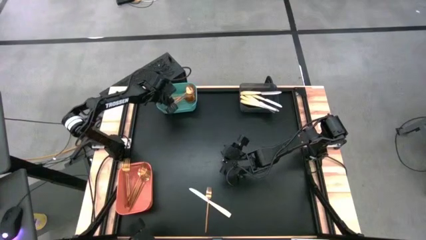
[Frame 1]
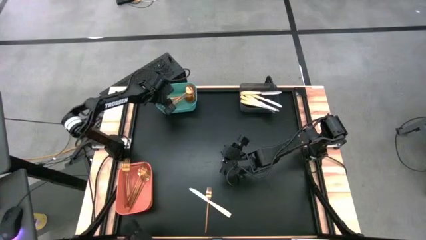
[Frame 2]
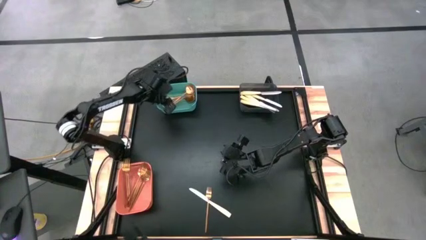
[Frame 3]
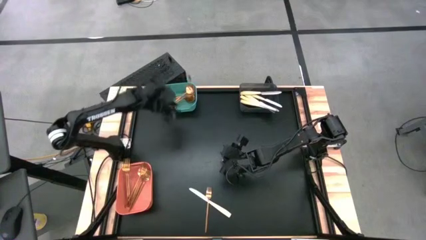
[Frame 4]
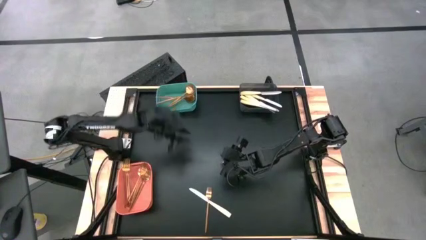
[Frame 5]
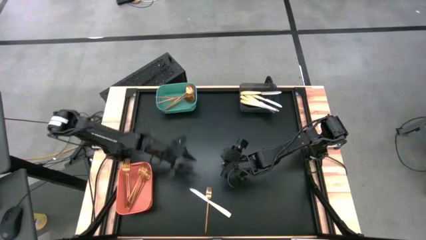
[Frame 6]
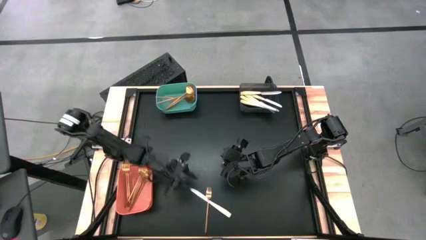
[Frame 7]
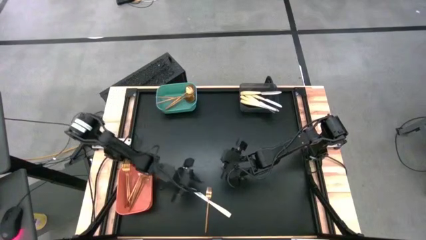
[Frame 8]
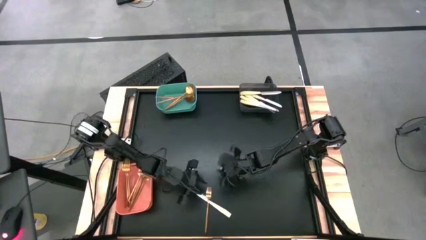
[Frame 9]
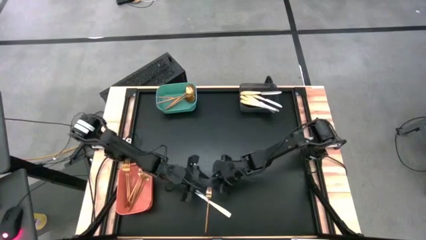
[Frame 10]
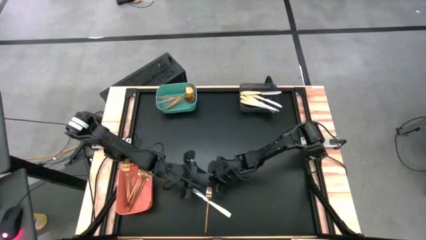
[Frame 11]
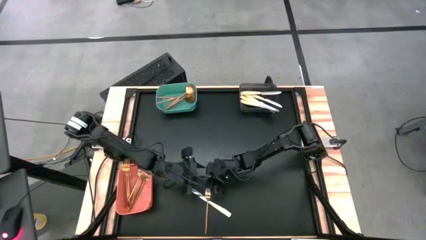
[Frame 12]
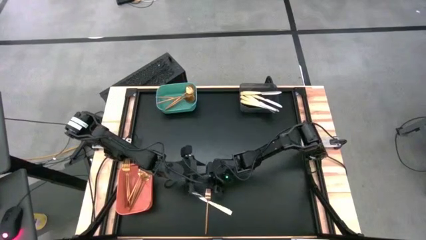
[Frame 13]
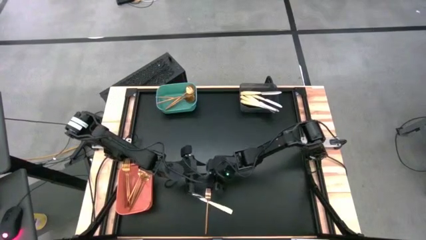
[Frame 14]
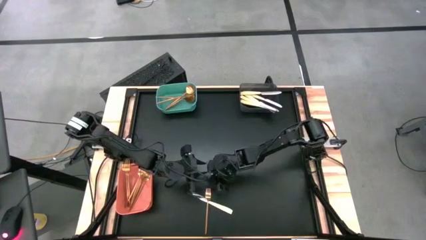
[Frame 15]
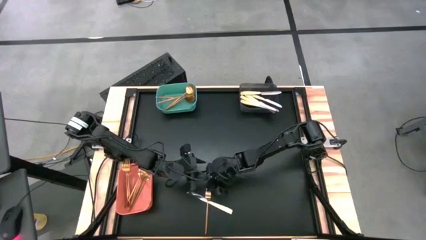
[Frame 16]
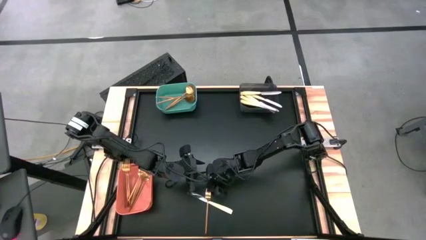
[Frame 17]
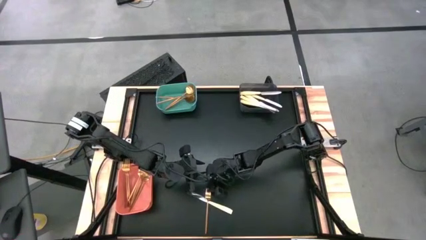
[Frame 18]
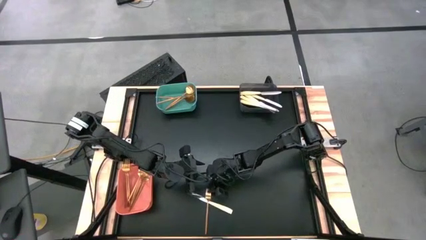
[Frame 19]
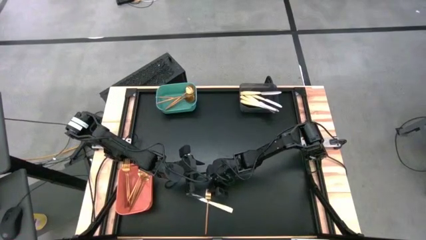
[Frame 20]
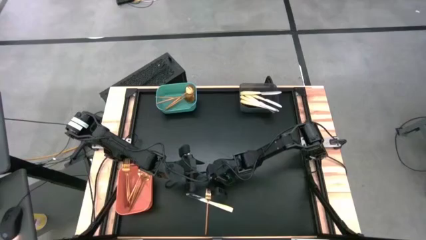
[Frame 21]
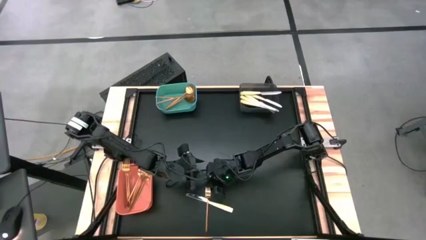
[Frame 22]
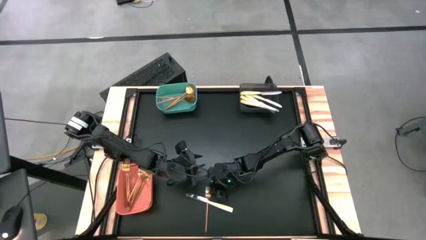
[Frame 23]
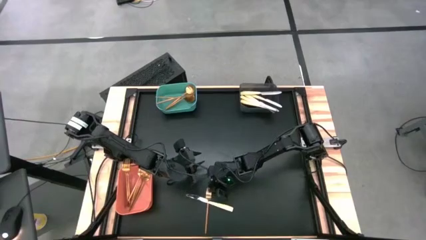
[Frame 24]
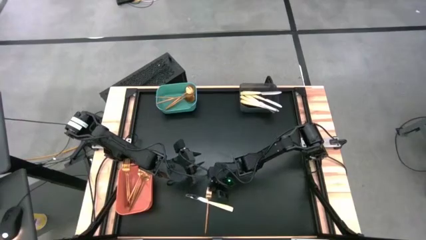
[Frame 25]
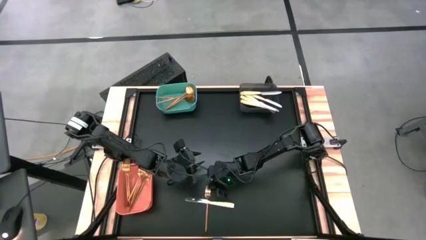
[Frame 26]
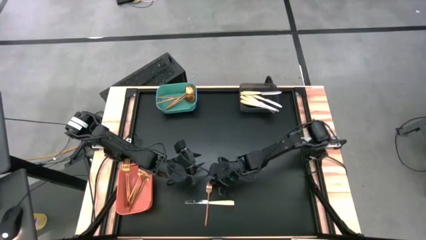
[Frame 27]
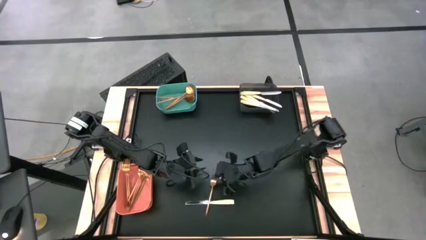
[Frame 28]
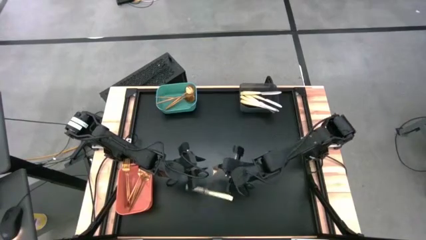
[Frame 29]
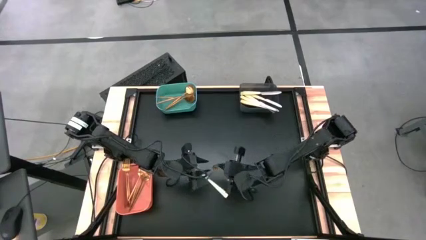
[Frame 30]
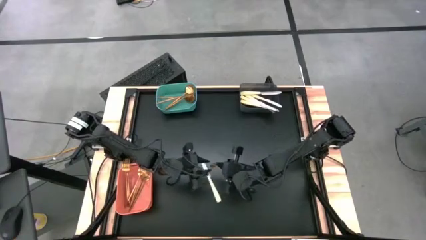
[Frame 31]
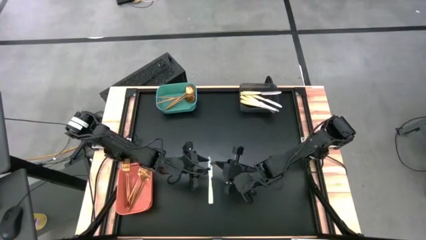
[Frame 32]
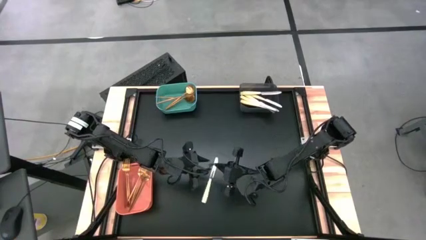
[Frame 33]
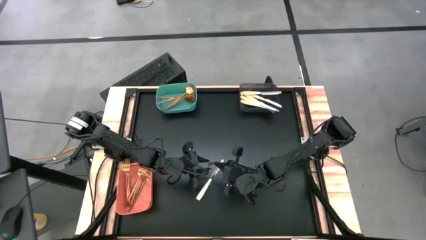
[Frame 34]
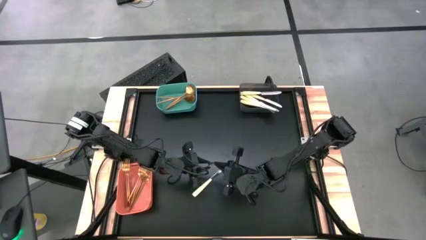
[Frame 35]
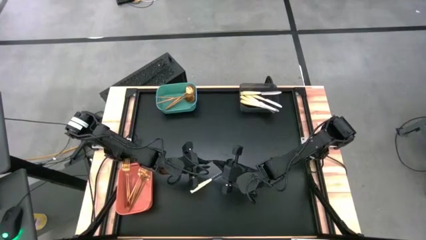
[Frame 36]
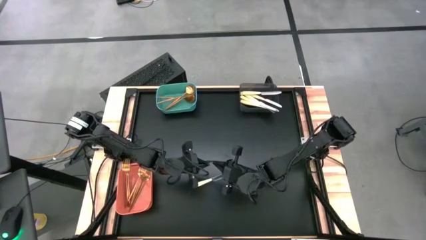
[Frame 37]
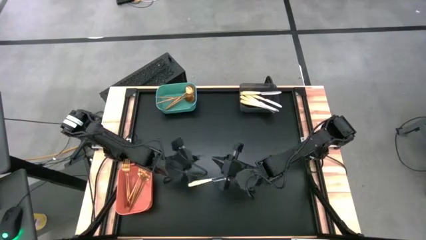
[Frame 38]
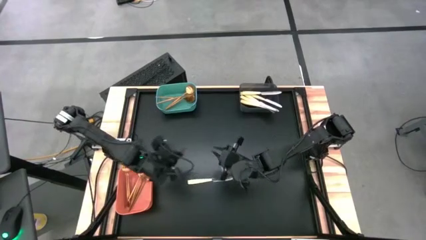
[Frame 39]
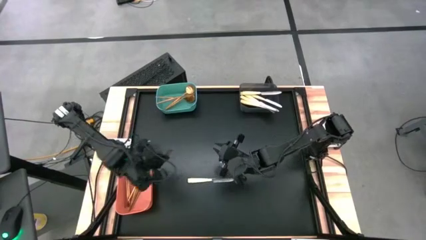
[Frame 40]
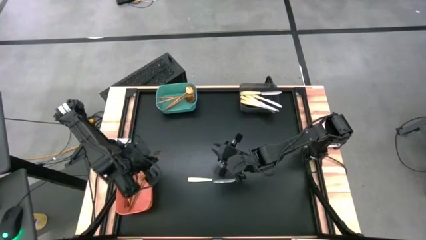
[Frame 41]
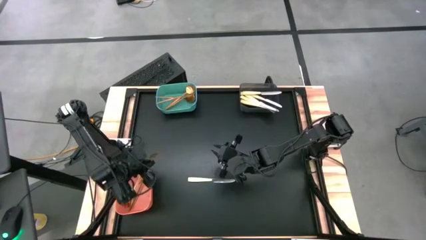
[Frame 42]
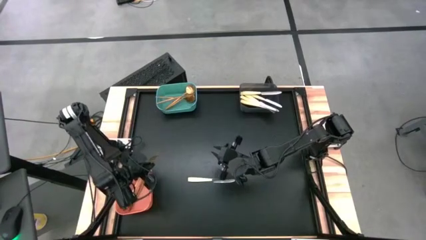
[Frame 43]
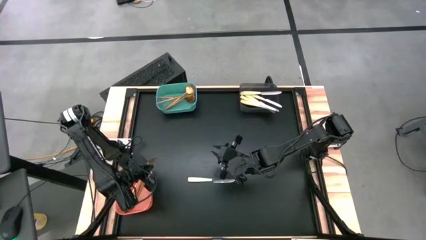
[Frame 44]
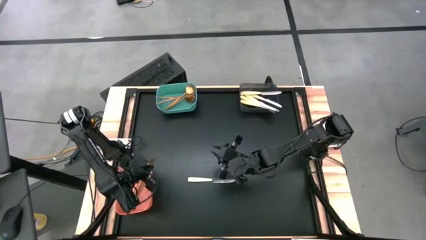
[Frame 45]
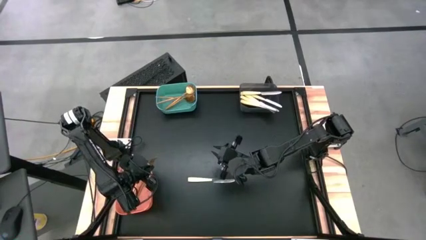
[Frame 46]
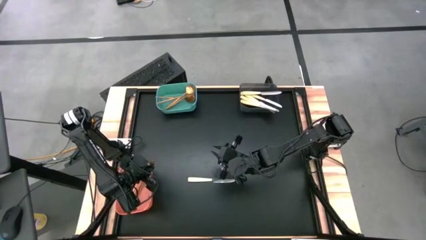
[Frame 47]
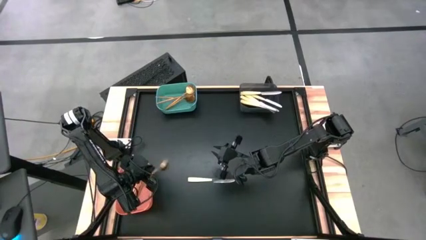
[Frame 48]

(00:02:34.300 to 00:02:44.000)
Task: Sort silverware by color (type)
Put the gold fork into the orange bin

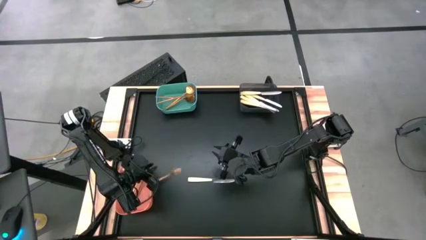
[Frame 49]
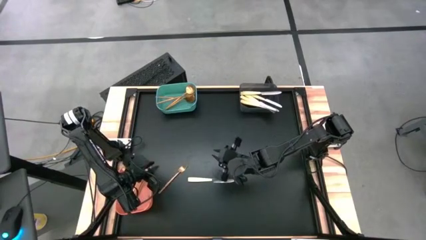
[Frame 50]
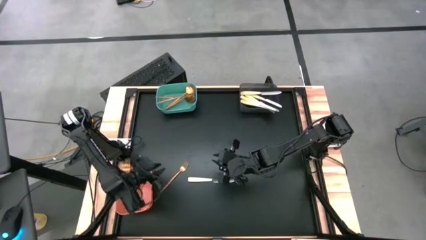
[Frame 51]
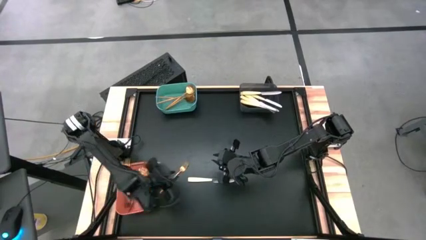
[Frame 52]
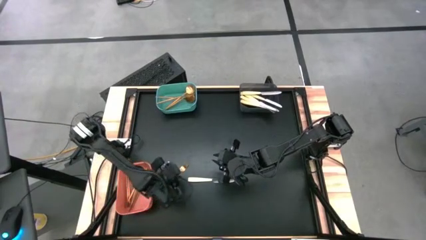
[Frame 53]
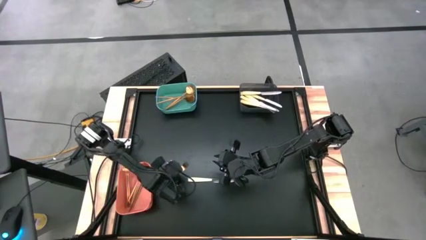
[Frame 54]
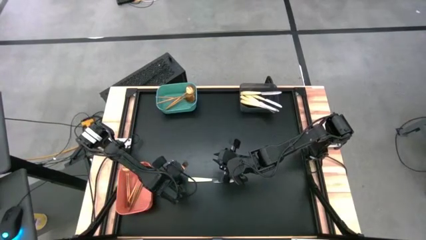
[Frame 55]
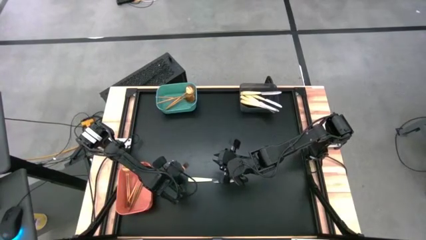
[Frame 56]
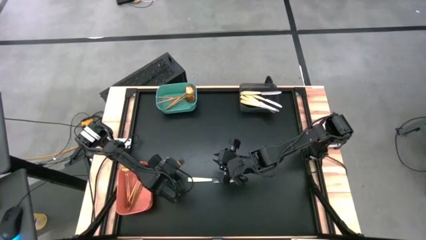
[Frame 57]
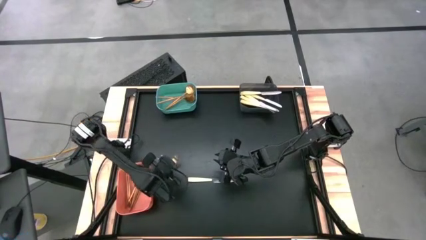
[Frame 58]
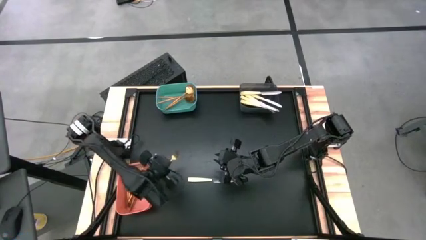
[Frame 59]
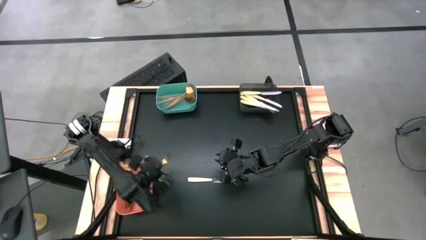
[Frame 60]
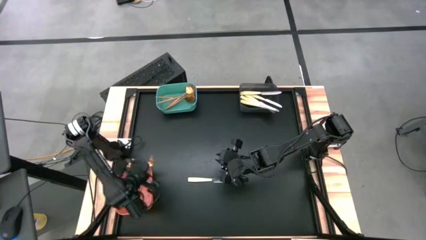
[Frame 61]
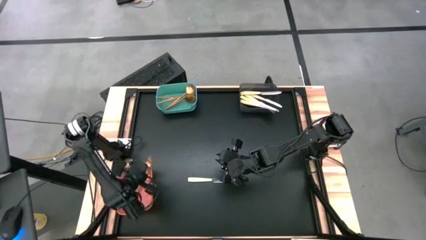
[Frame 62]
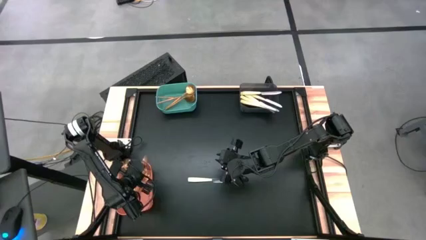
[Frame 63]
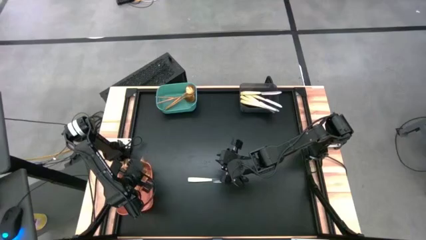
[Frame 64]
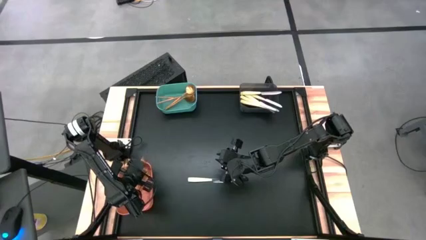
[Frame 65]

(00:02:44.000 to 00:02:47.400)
Put the gold fork into the orange bin

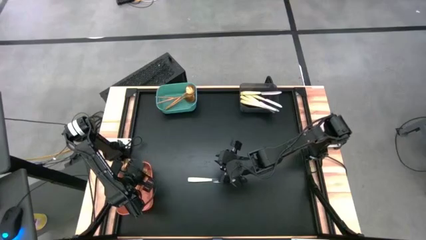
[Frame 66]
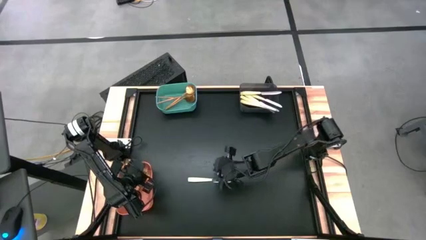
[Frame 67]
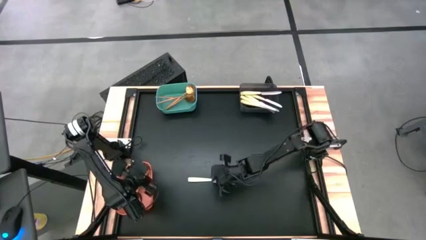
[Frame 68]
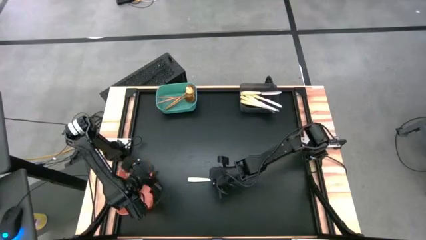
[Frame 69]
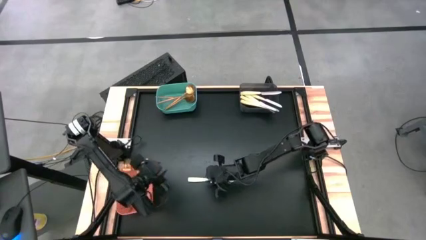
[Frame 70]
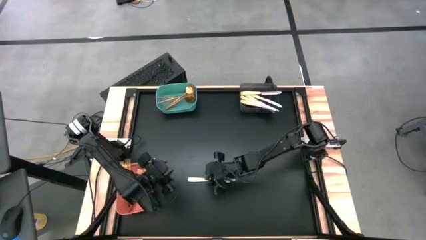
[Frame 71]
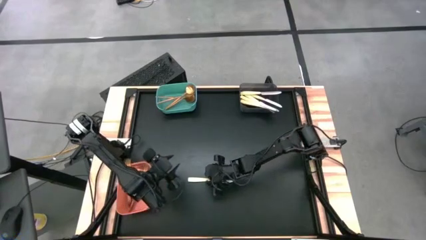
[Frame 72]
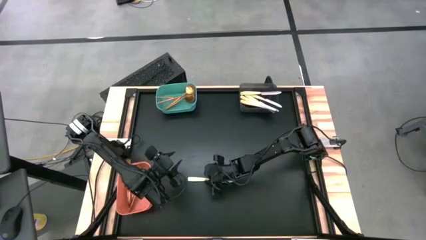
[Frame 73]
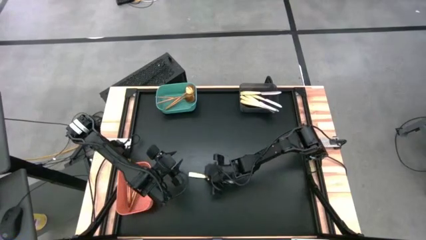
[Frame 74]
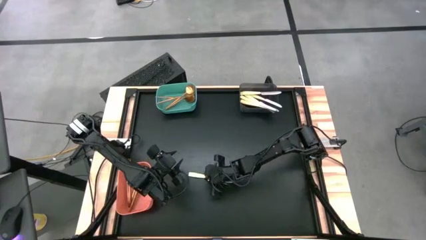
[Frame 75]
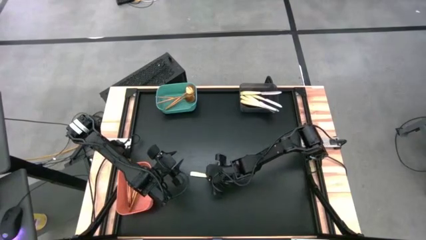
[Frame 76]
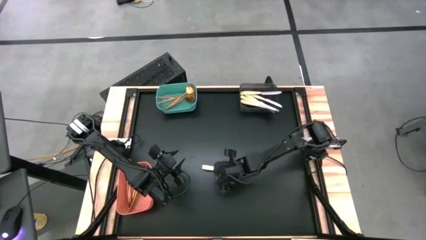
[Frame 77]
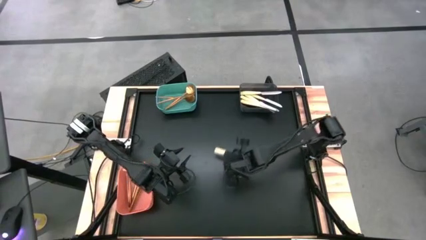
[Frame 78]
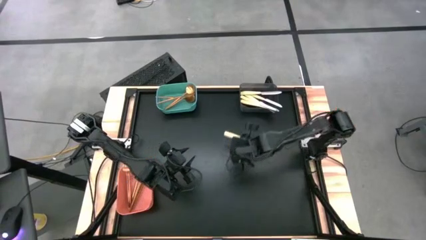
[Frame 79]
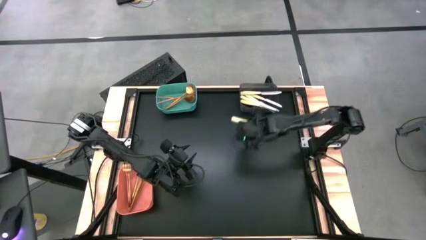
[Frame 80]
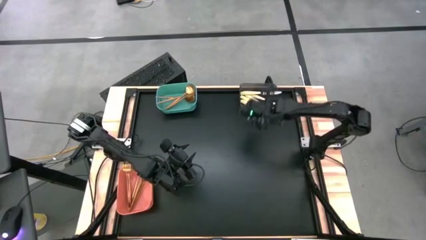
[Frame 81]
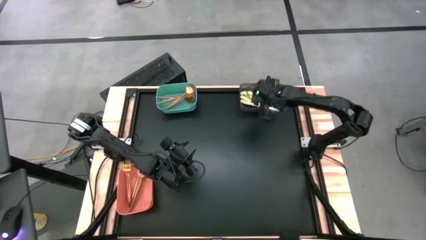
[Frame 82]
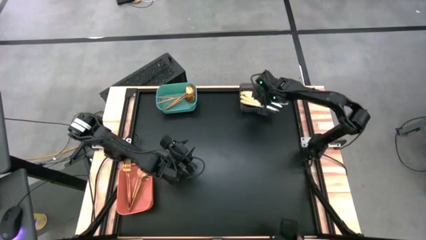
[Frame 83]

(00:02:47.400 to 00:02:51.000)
Put the yellow knife into the black bin
